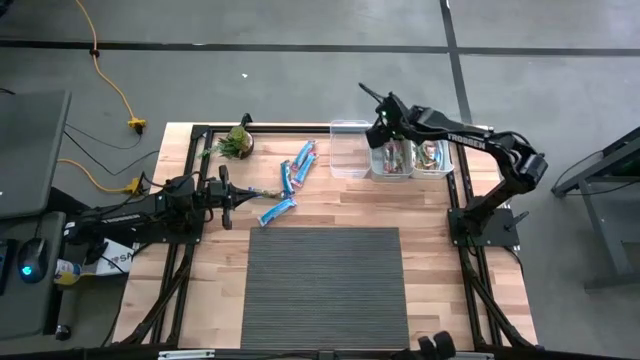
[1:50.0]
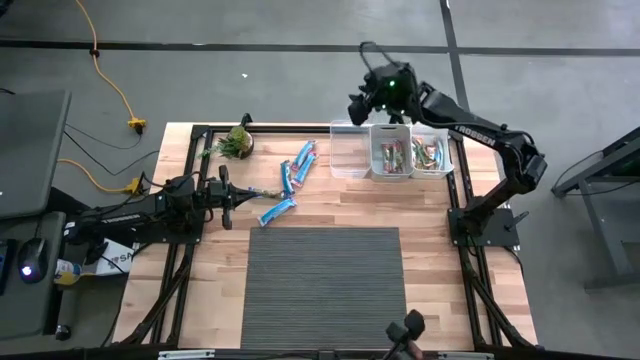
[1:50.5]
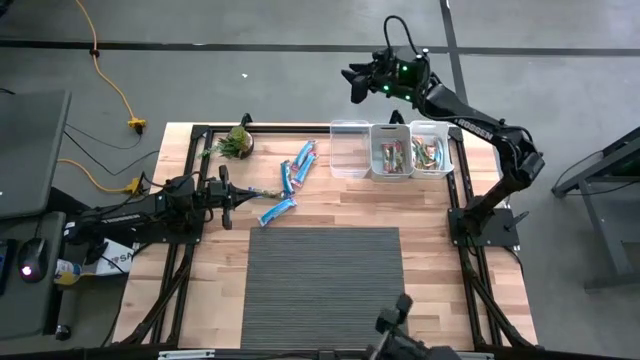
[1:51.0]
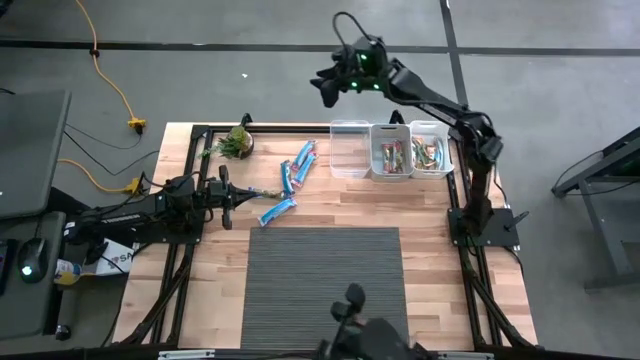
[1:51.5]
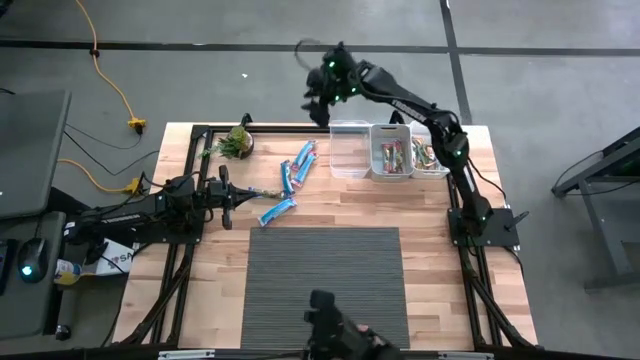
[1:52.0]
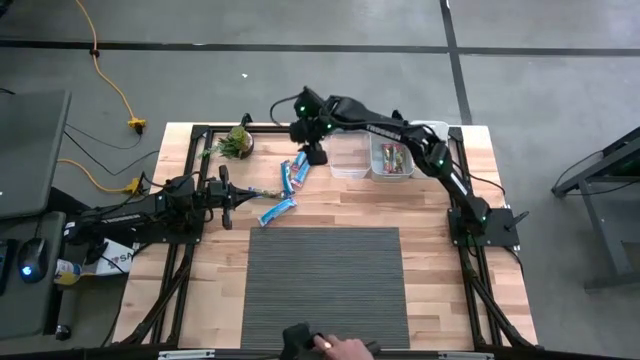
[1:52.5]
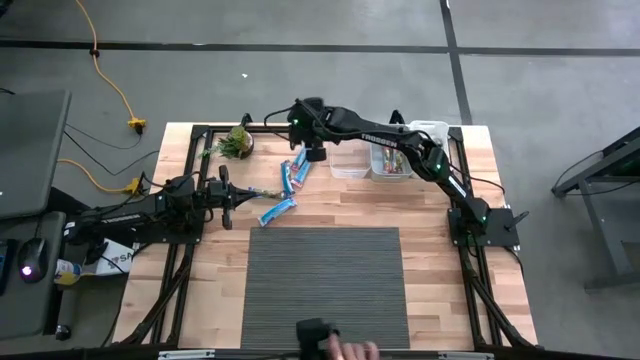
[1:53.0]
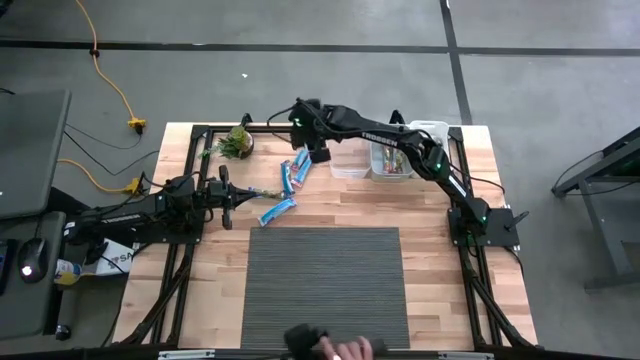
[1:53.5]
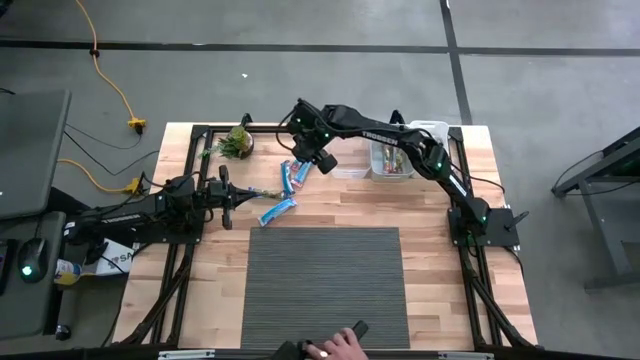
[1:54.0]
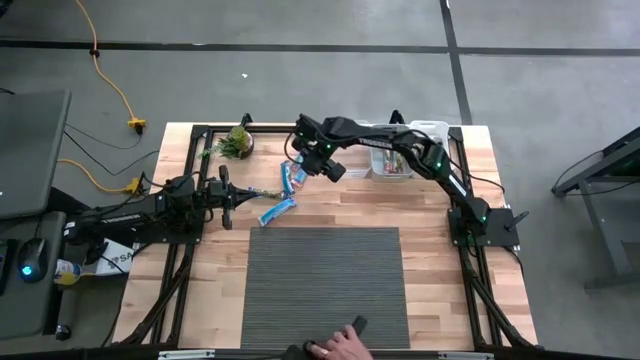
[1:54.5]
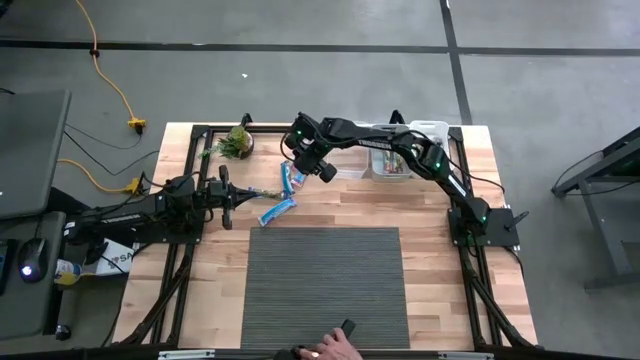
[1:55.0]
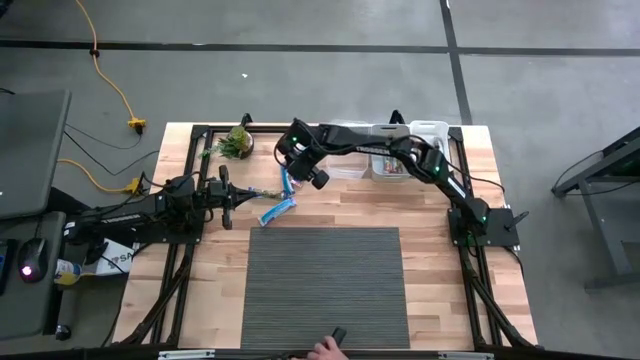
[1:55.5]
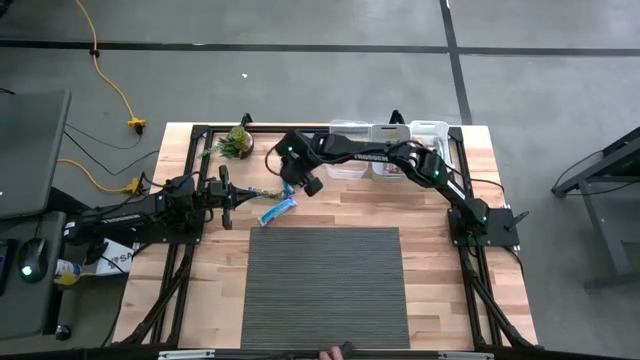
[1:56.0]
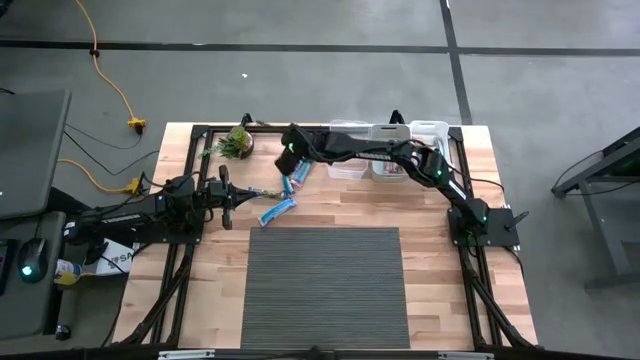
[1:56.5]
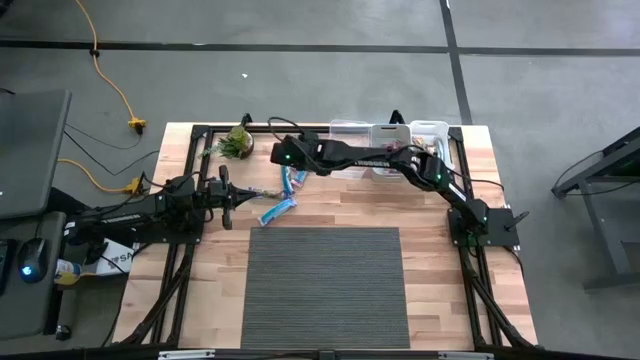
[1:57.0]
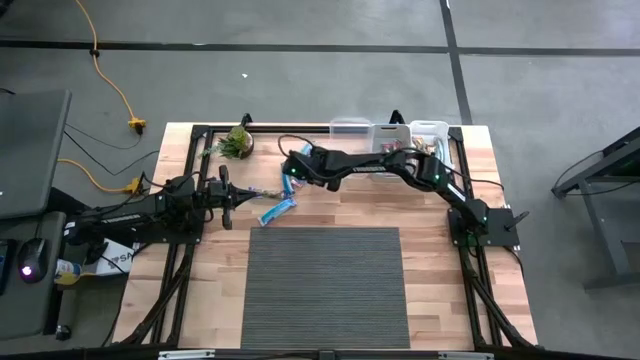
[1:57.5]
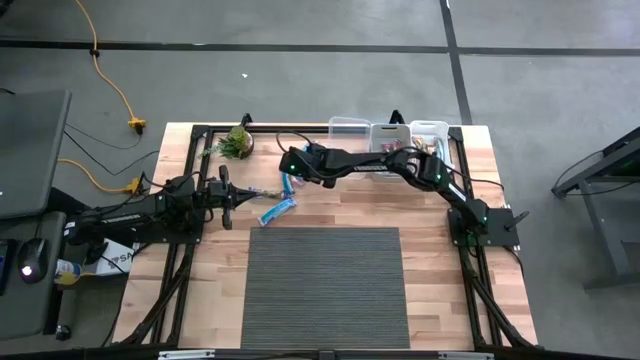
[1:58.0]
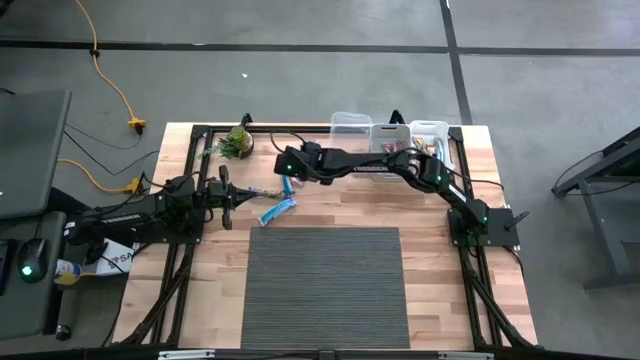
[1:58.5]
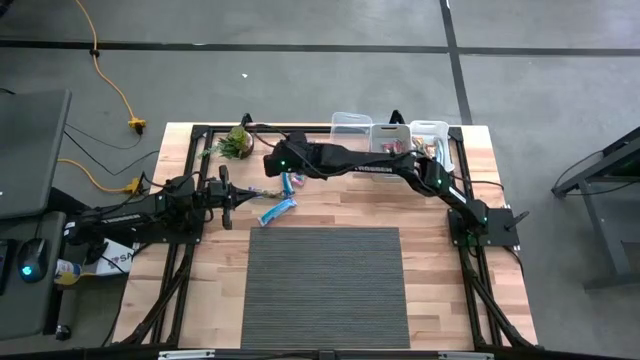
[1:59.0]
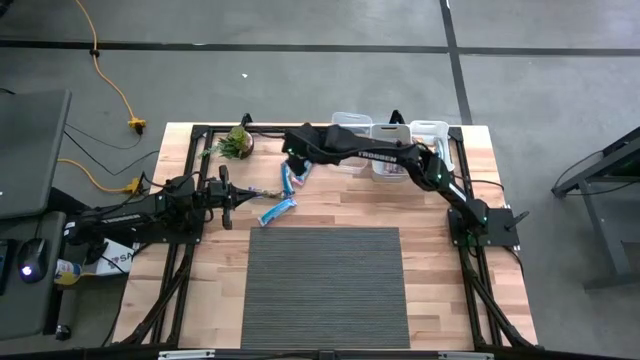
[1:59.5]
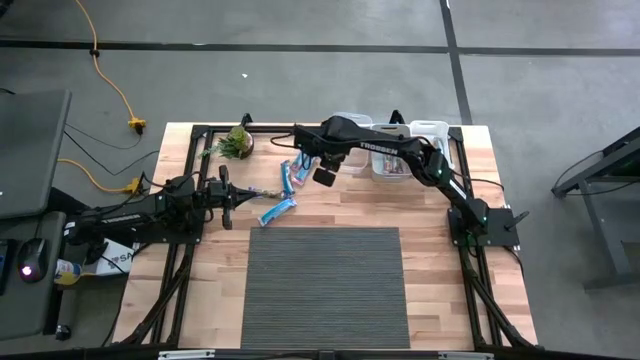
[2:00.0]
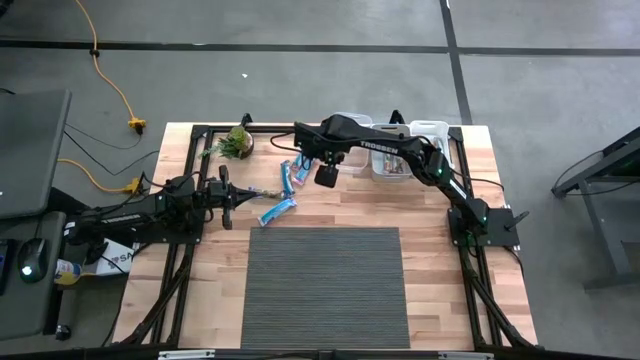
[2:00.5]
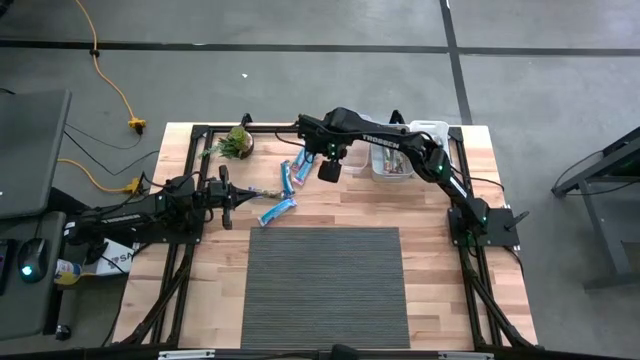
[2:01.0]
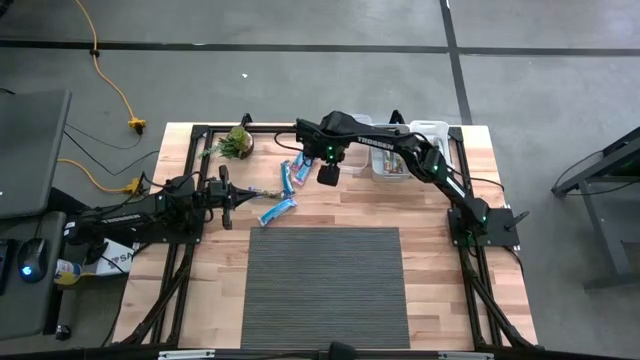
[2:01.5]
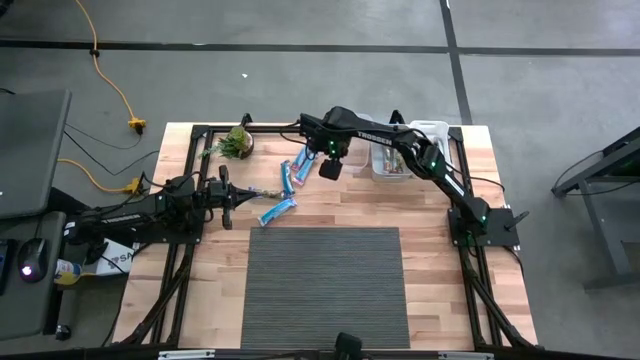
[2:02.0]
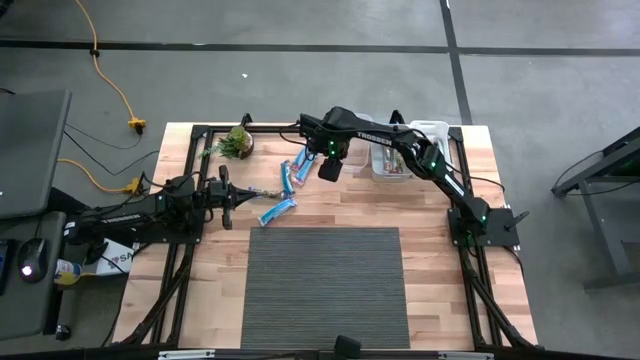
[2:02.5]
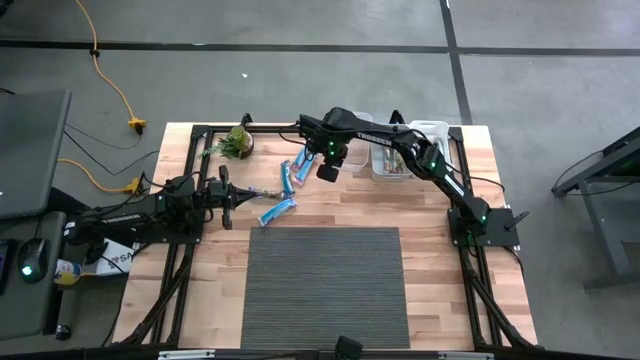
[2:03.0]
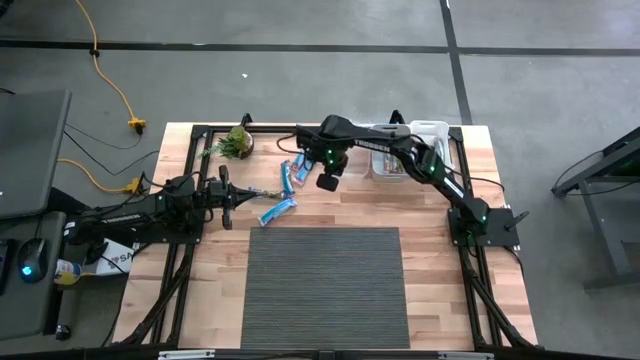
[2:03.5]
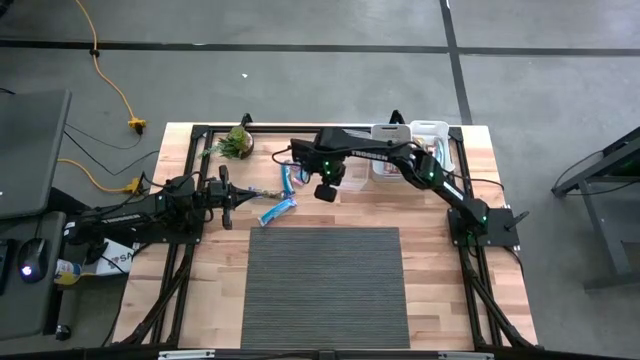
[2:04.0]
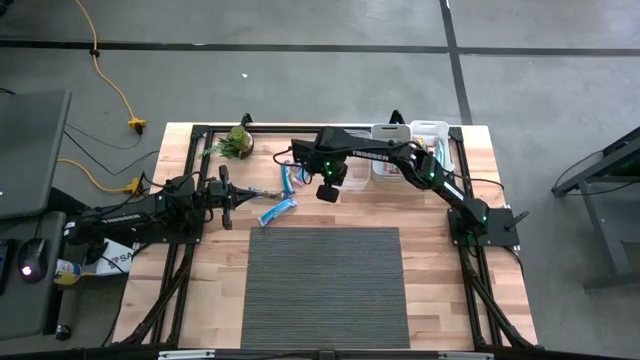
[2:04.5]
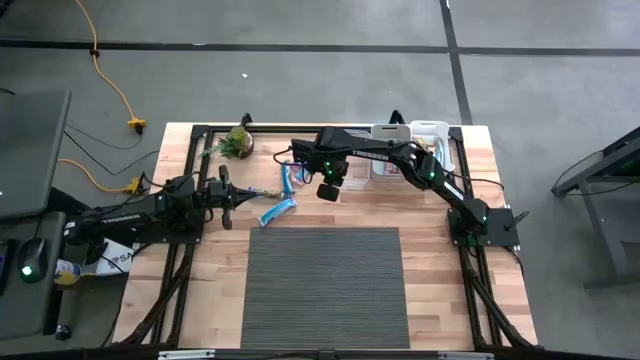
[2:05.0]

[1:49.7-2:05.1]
Task: Pick and place Granola Bars by type
Adjust the transparent bin on the table

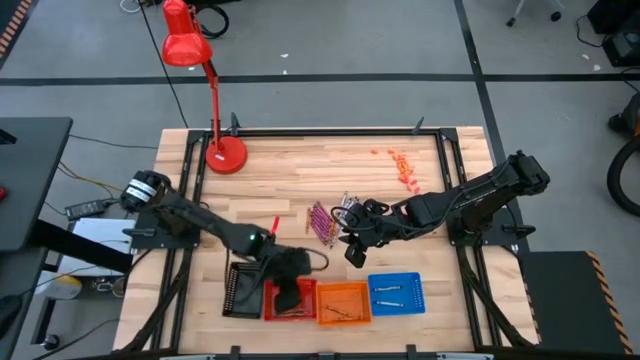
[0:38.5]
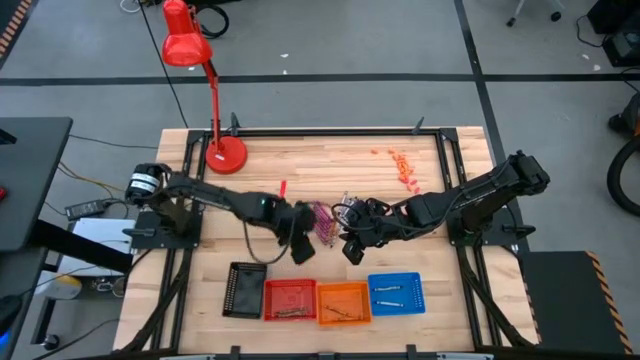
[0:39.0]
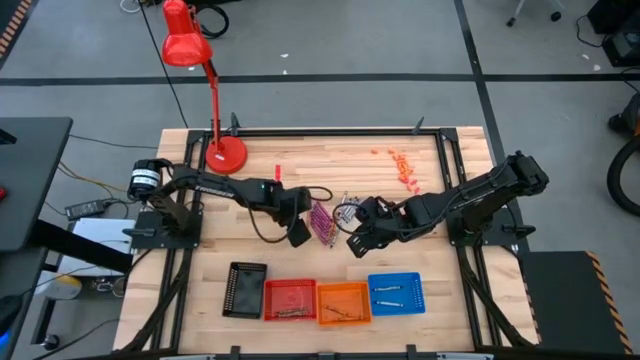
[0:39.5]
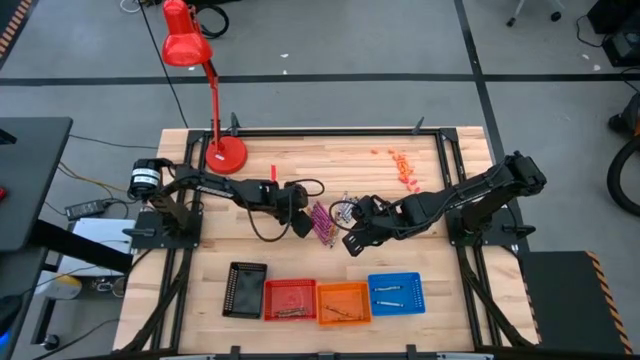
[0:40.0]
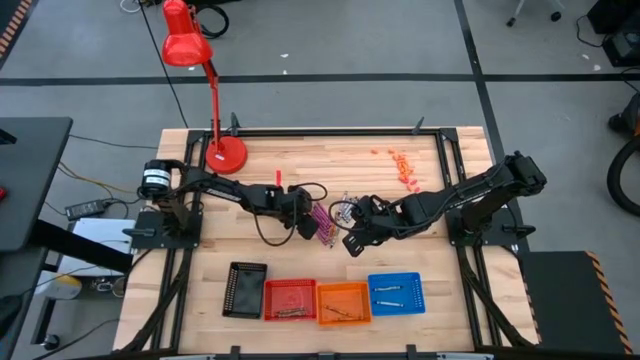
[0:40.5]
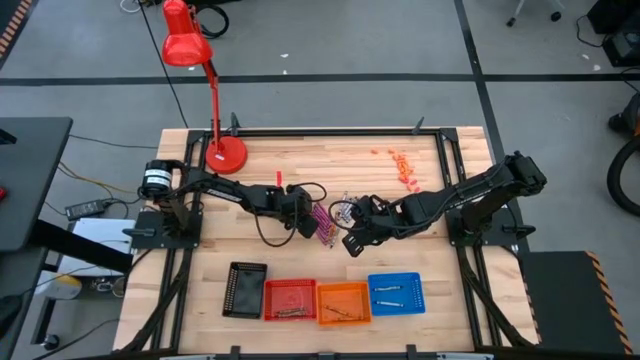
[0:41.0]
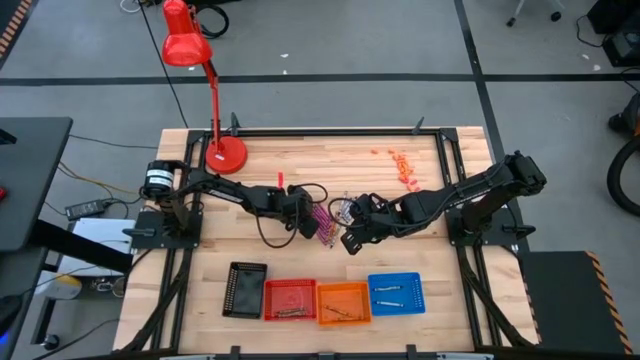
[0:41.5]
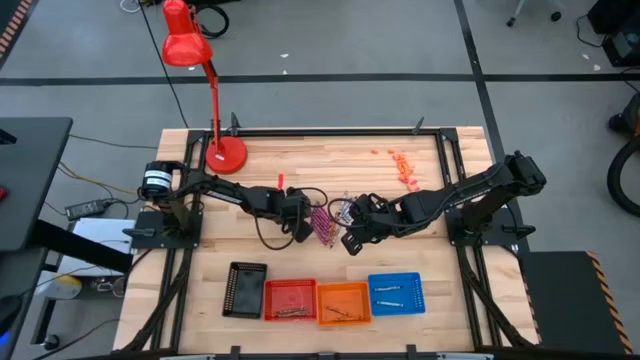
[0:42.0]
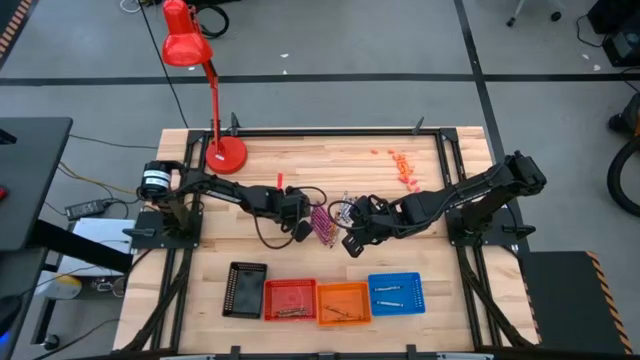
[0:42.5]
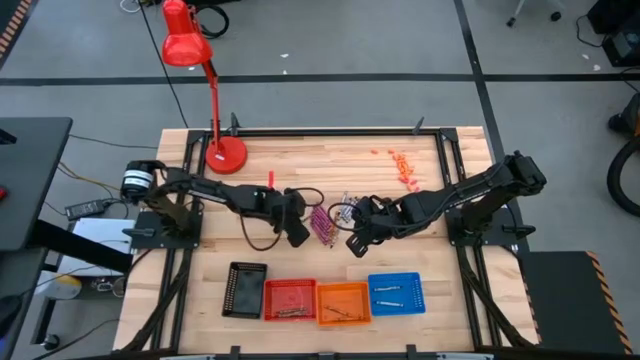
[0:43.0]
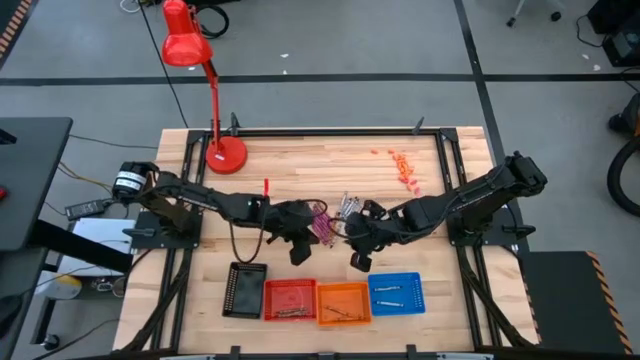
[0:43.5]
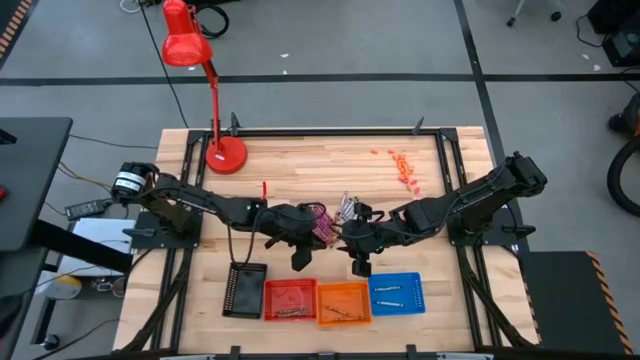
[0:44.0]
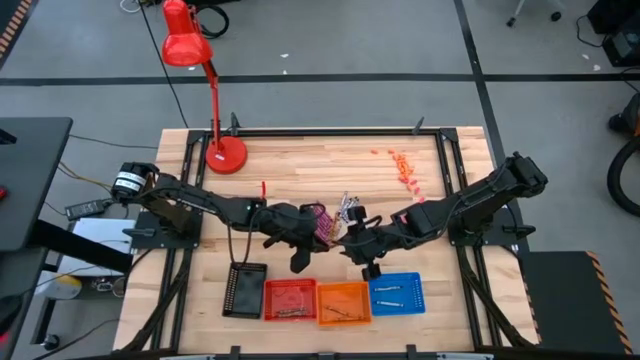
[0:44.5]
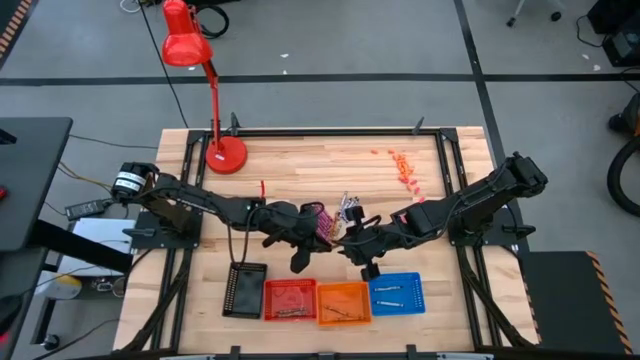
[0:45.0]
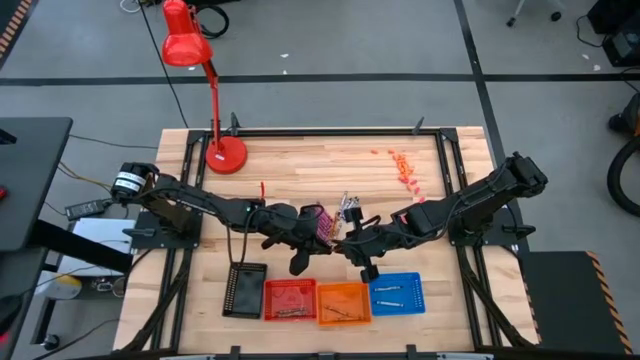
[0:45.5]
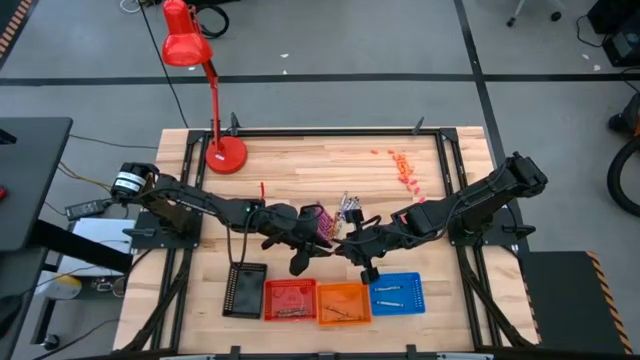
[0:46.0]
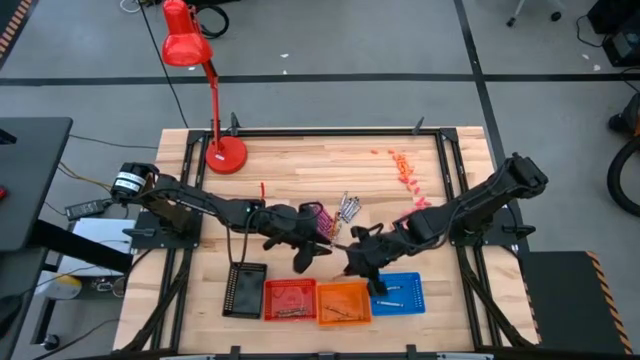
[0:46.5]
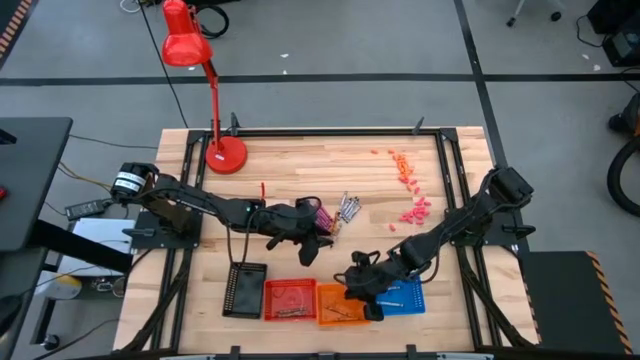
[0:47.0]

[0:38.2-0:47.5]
Task: Sort crayons
Put the orange crayon into the orange bin
